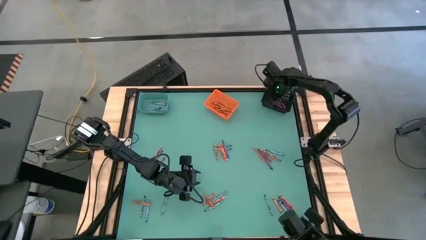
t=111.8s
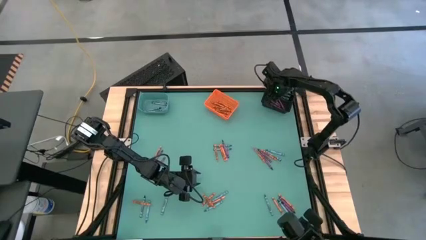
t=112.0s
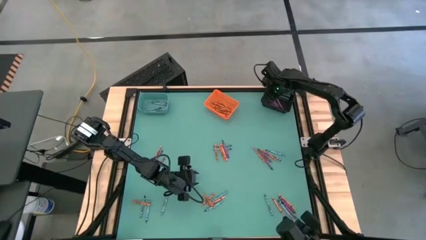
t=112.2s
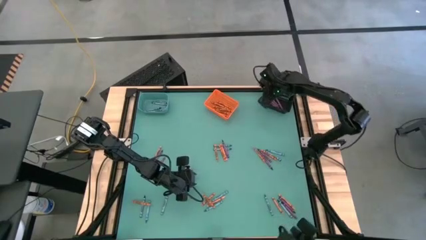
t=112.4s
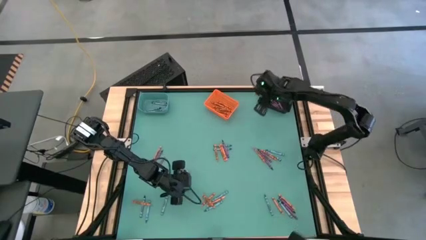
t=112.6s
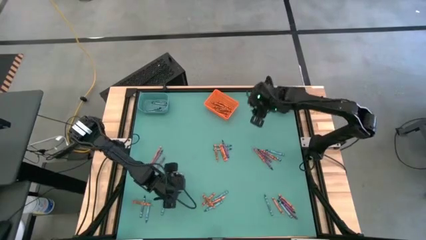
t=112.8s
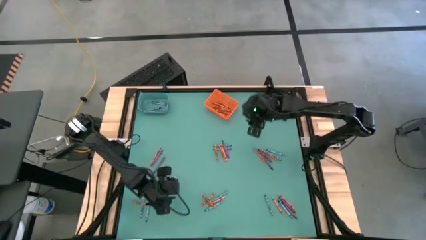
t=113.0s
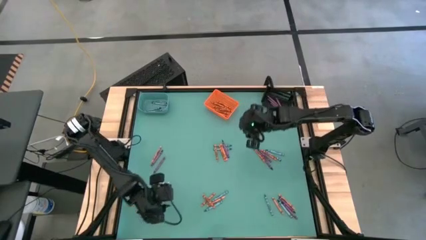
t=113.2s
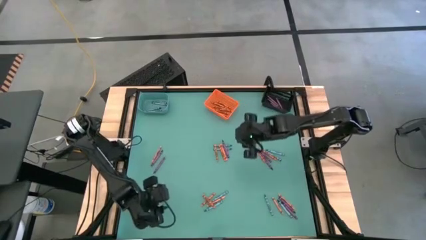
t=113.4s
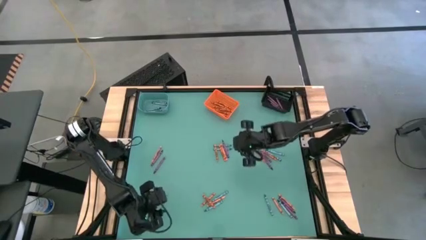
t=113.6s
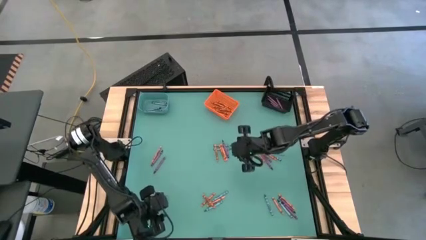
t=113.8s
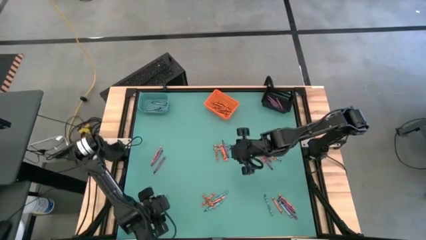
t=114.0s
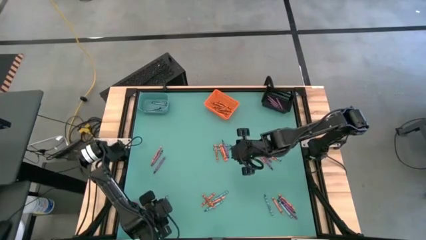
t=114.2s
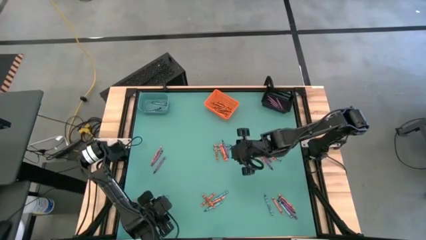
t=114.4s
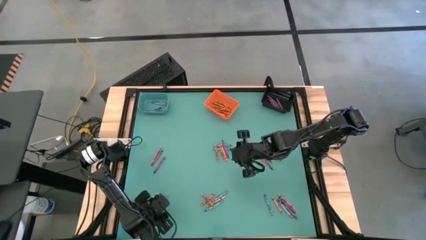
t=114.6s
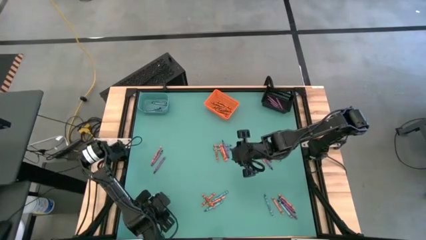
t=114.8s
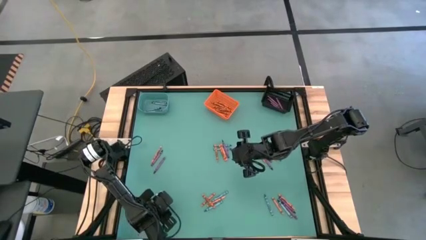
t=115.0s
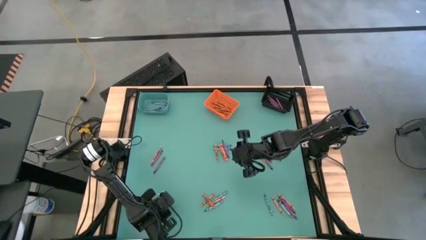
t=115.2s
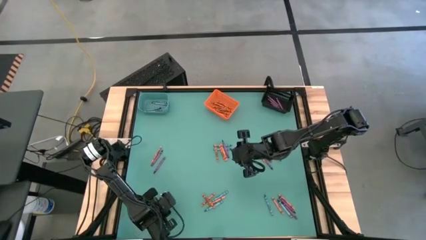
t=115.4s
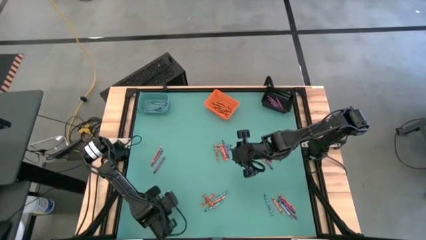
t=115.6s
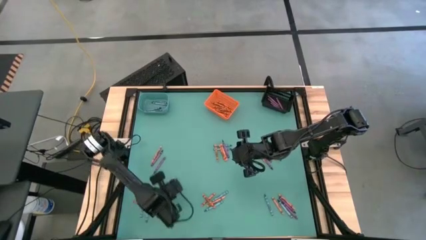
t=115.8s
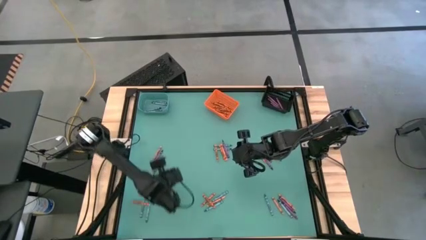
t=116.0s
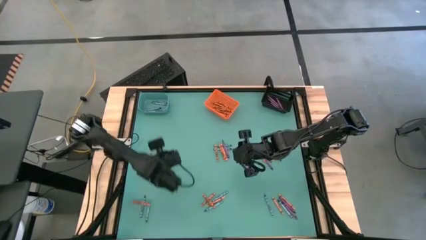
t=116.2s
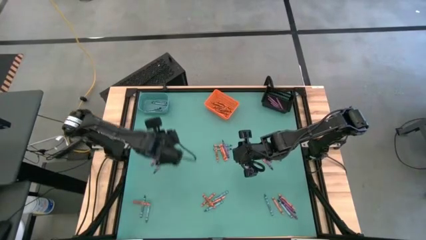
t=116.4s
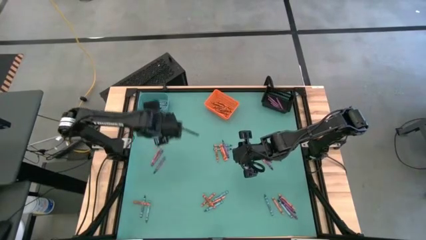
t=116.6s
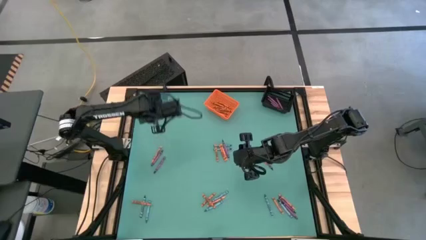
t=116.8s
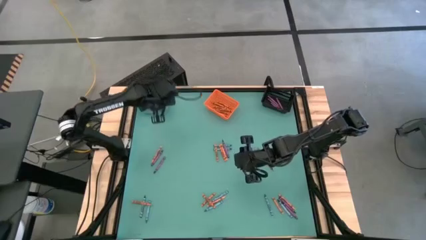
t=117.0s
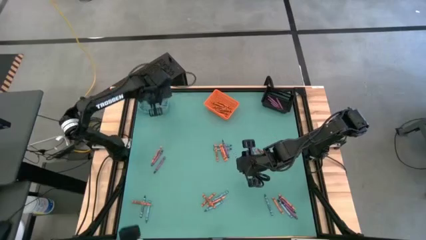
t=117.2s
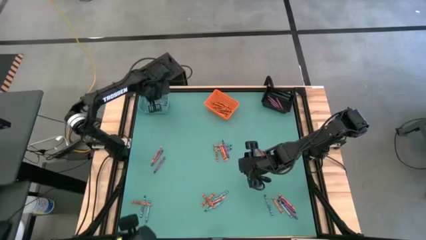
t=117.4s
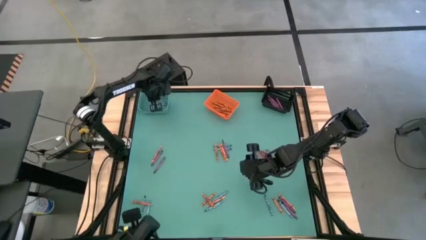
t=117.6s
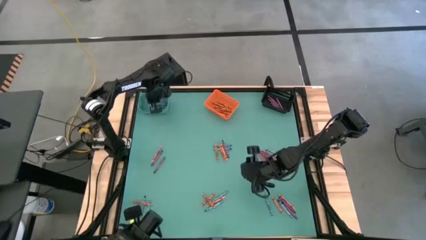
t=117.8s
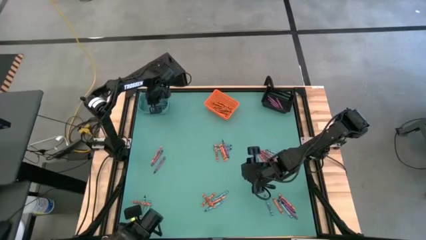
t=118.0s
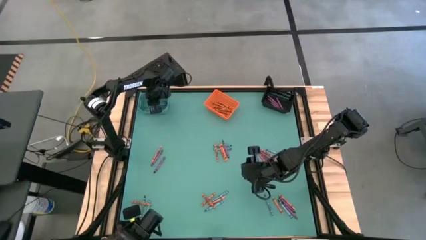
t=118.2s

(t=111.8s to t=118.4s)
Task: Sort crayons
Put the blue crayon into the blue bin

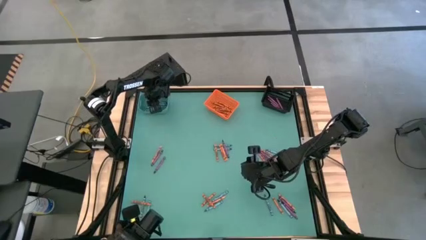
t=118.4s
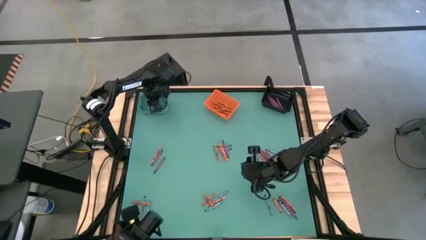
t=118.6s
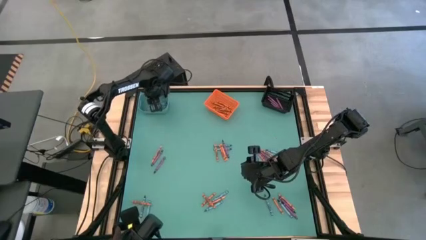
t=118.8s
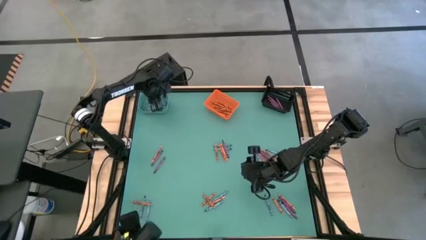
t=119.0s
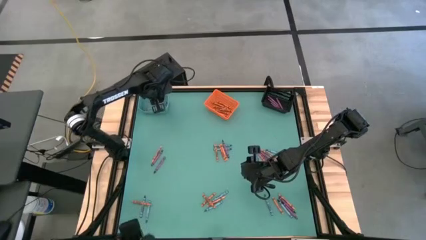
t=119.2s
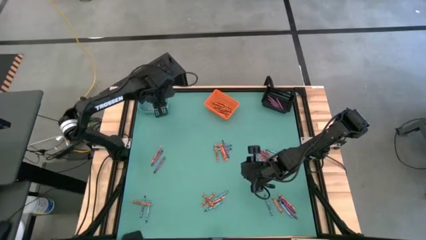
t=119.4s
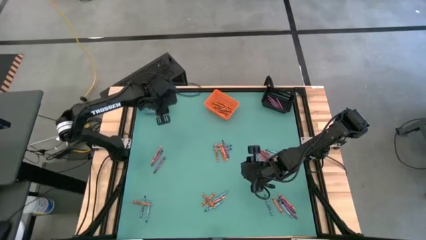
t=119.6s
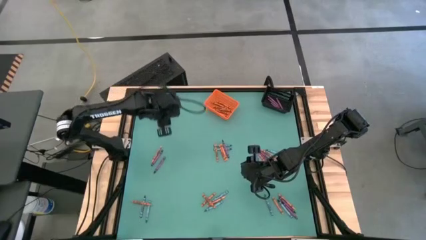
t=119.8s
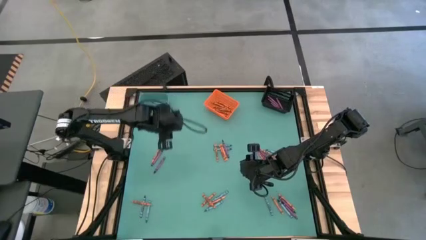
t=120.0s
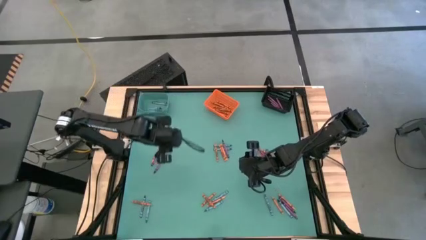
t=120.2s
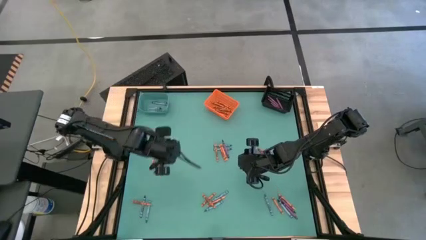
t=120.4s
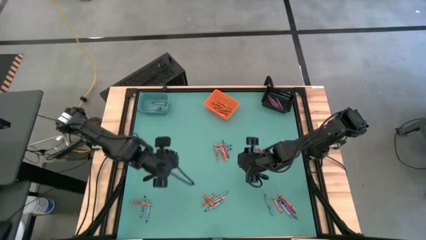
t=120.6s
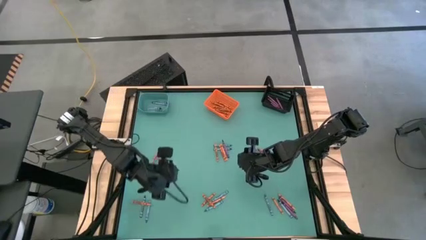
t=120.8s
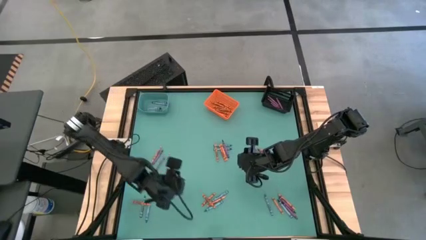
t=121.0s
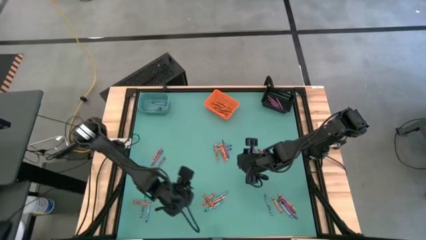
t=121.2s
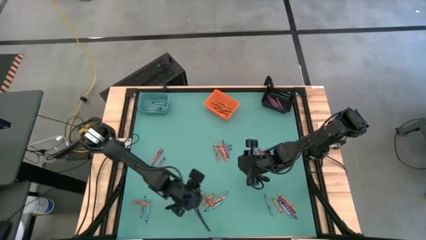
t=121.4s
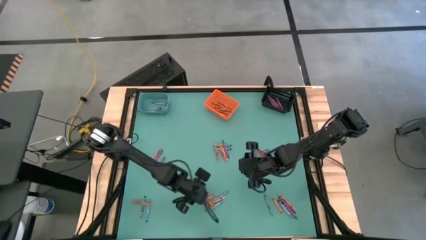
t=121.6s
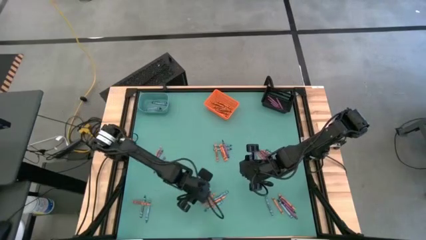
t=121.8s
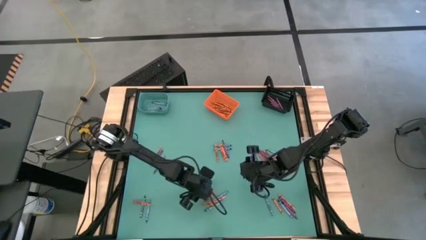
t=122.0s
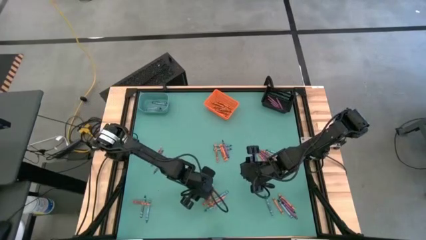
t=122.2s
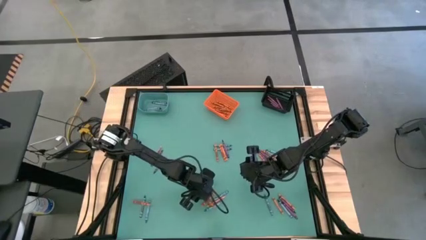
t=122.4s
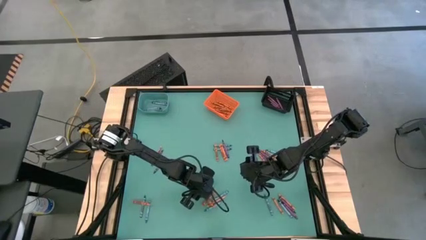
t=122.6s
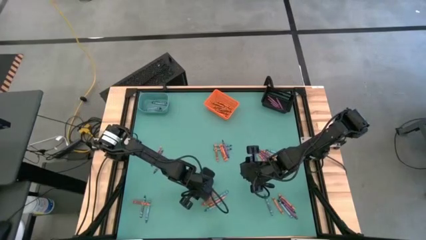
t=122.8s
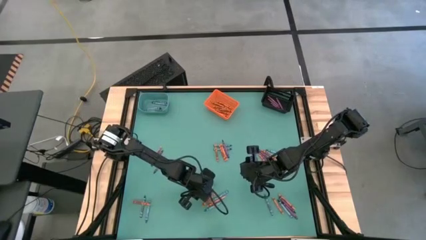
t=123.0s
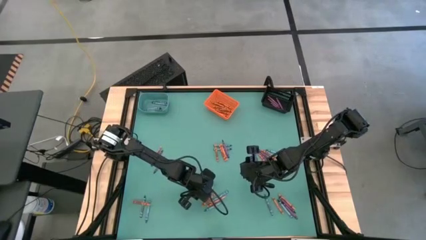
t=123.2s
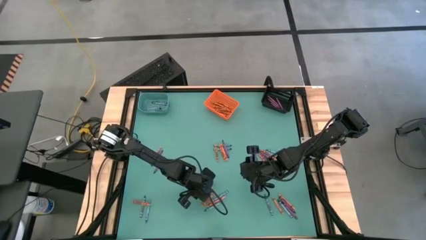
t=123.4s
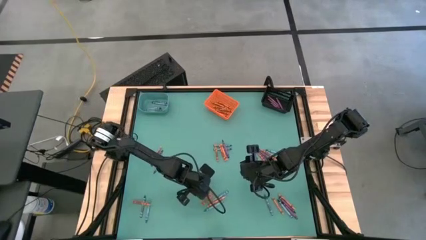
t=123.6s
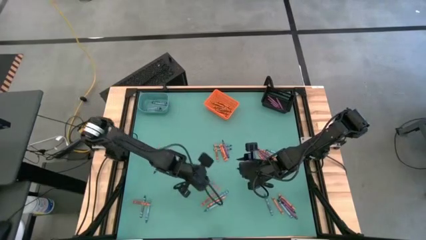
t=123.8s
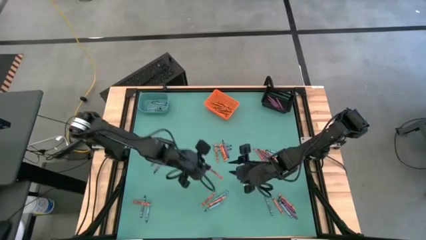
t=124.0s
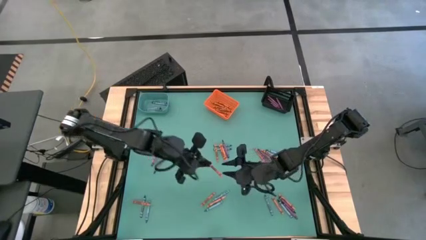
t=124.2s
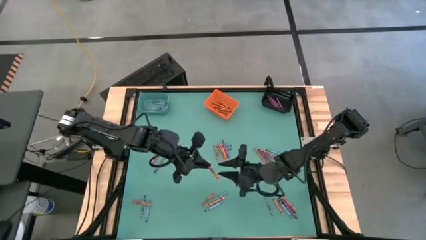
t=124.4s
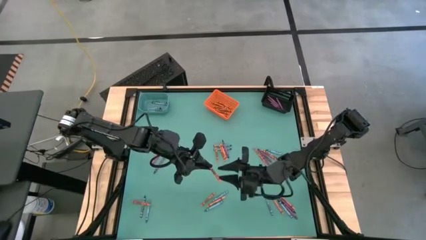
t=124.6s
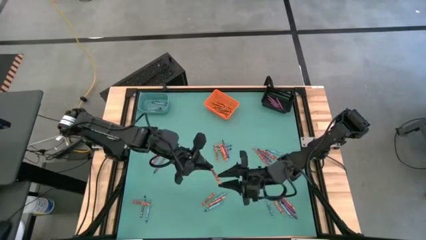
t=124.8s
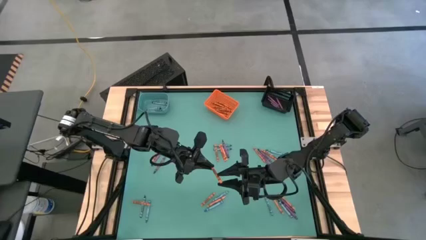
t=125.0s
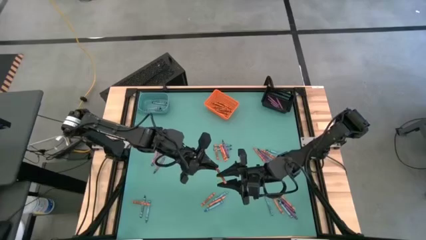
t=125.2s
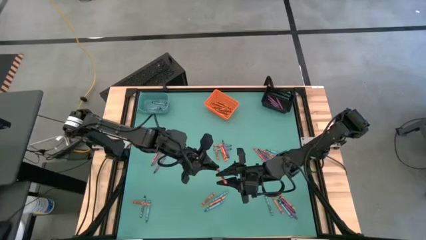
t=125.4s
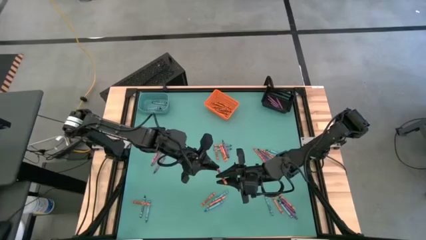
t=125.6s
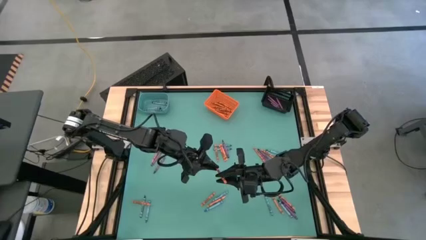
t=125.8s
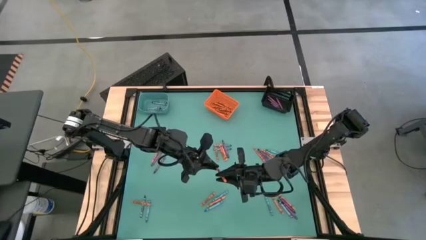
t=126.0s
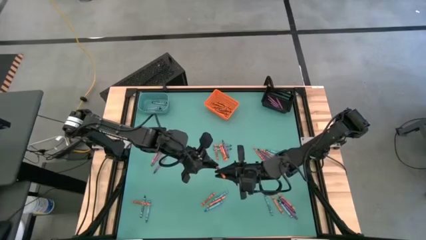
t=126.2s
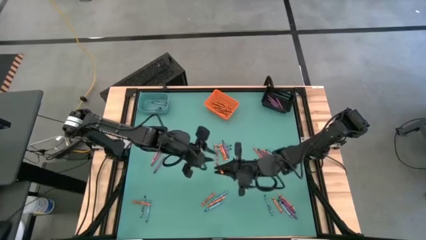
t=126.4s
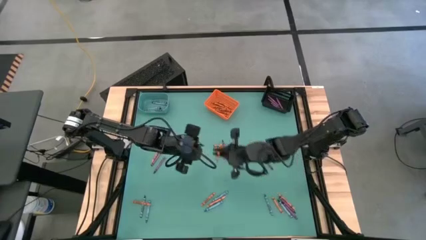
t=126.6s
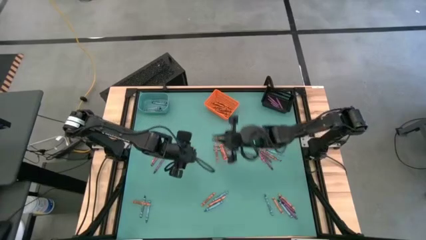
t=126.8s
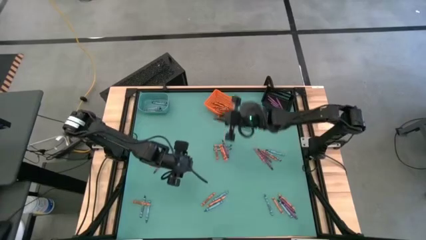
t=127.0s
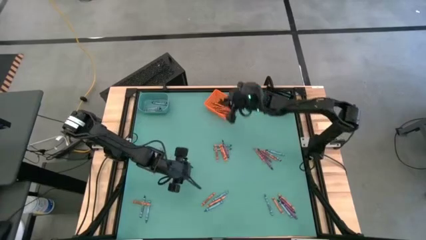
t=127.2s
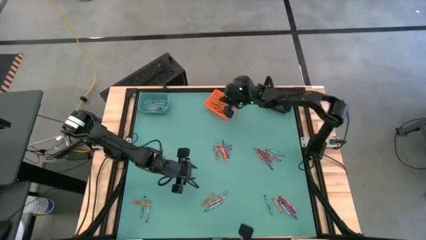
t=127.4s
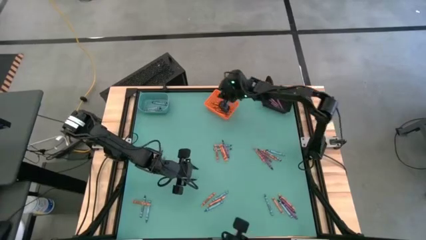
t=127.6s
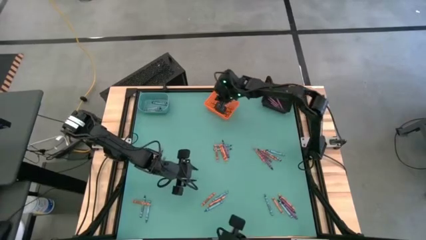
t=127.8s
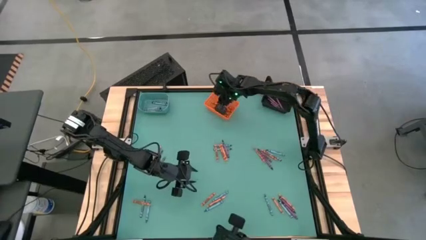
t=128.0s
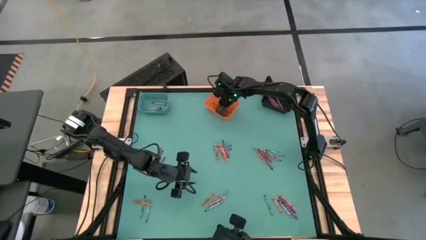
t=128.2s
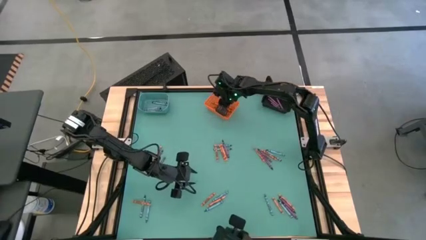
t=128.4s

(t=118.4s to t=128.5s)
Put the orange crayon into the orange bin
